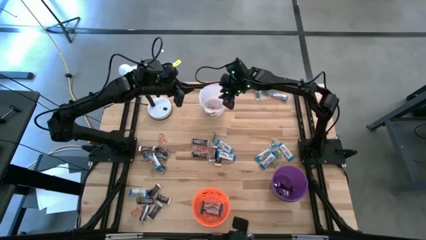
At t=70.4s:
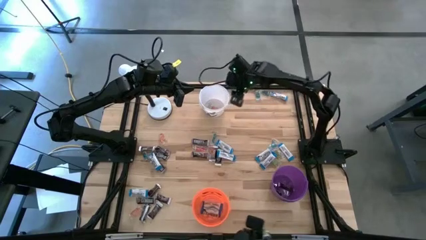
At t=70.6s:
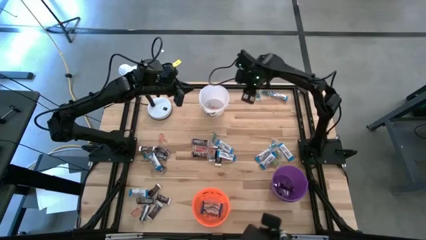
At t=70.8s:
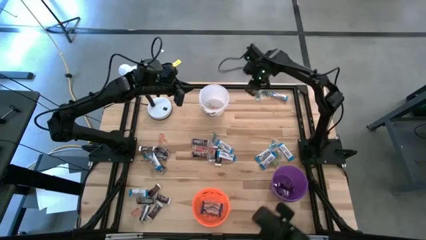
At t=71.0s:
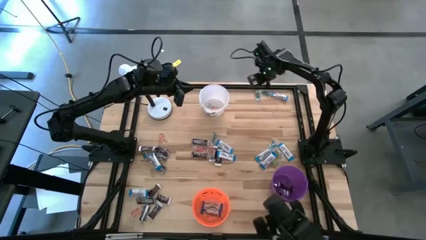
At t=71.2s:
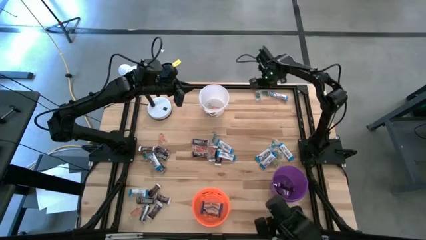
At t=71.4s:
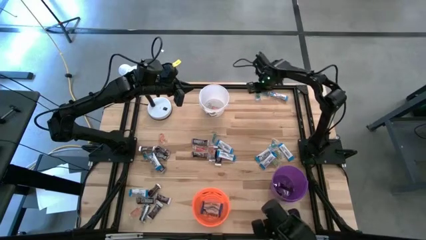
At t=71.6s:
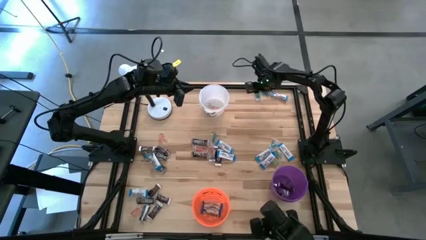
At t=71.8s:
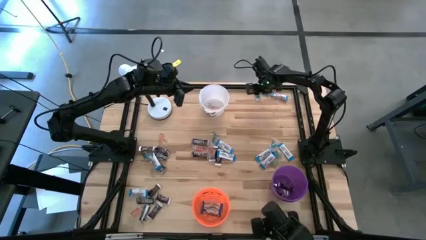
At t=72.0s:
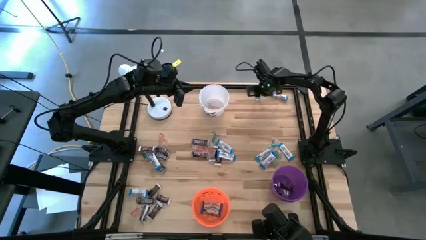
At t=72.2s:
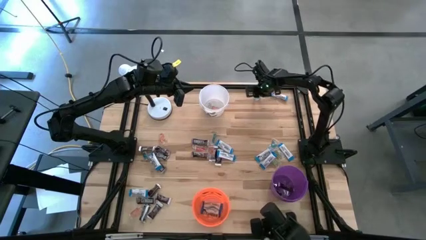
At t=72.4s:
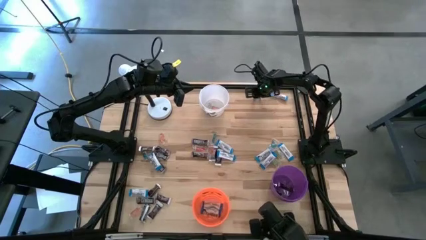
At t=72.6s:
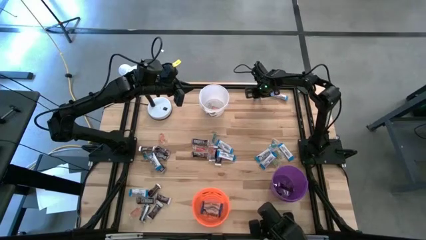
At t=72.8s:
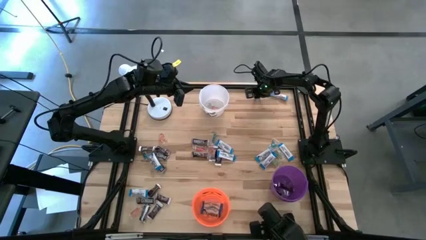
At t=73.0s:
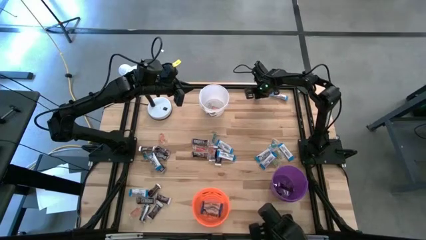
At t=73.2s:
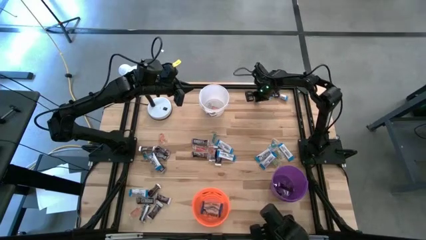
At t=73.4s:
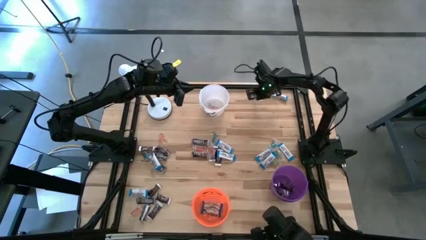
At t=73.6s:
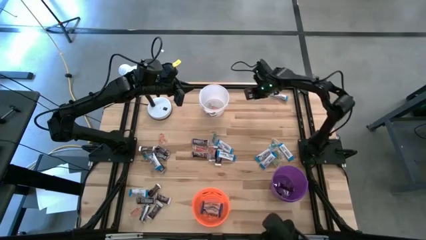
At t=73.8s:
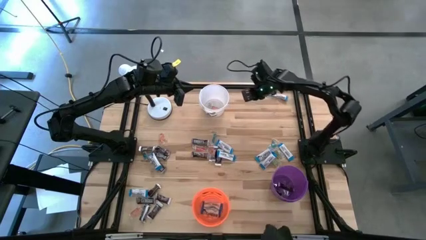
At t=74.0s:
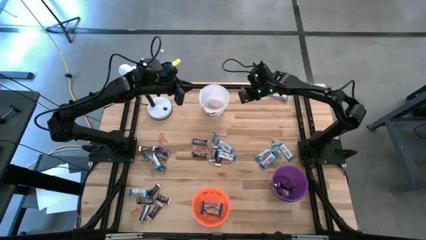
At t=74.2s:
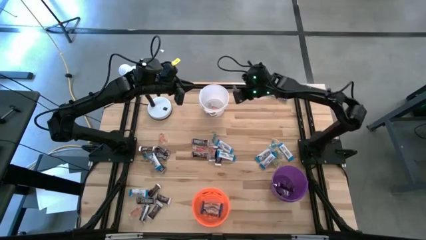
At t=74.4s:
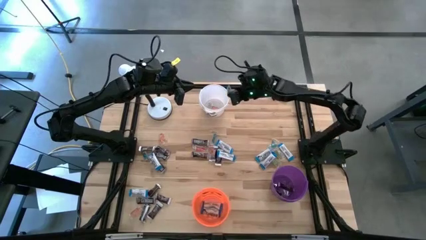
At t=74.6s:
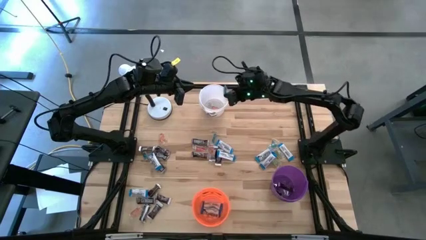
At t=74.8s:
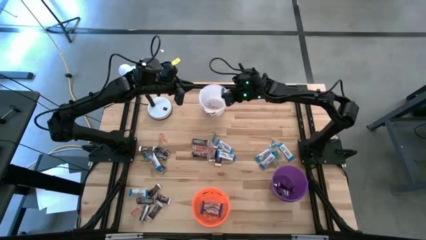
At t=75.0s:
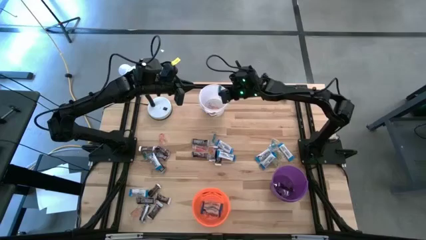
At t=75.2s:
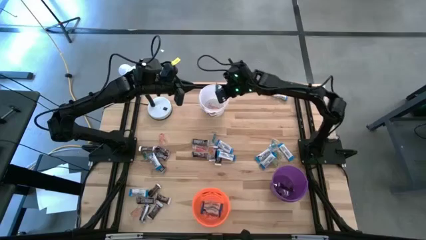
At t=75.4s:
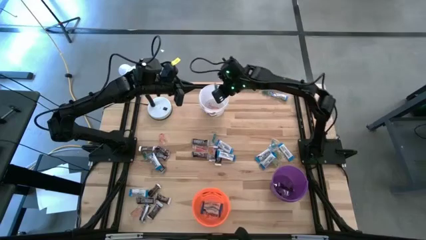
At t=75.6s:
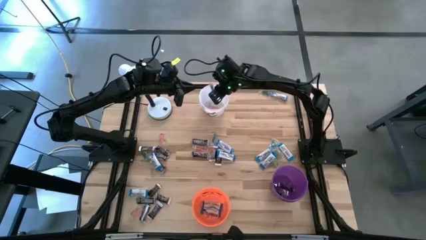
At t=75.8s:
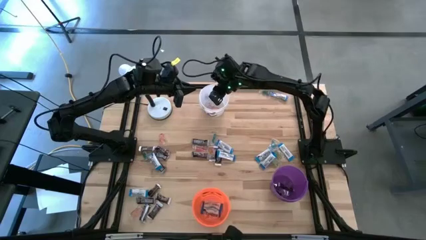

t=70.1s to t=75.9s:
Task: Organize candy in baskets
Put the blue gummy into the white bucket

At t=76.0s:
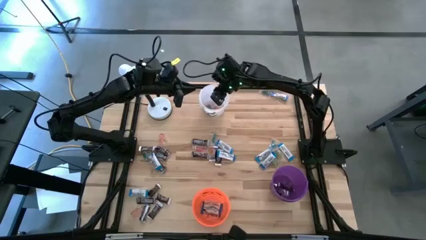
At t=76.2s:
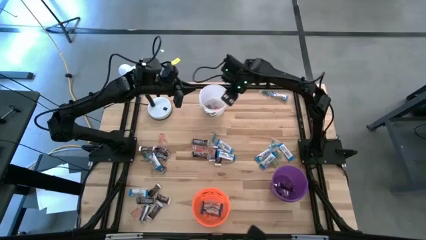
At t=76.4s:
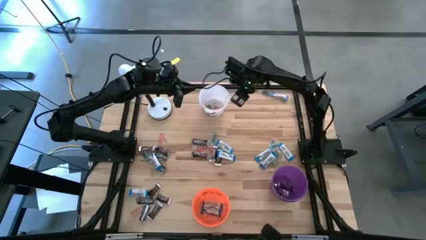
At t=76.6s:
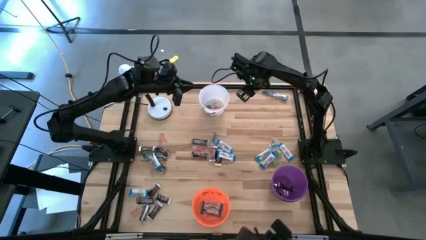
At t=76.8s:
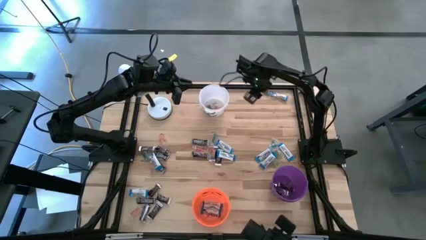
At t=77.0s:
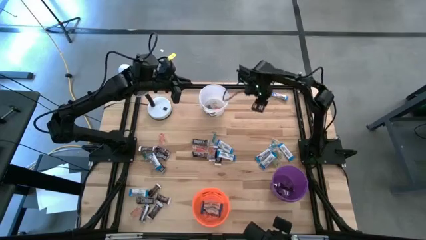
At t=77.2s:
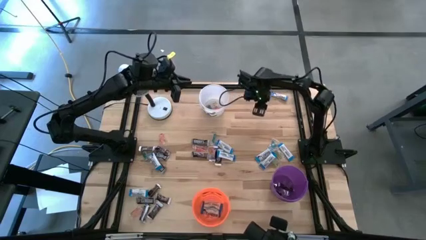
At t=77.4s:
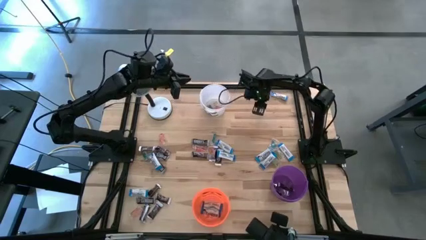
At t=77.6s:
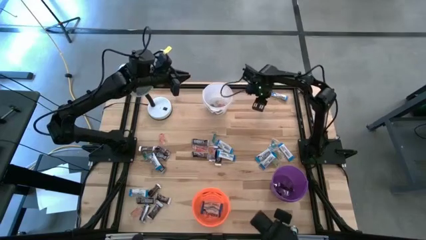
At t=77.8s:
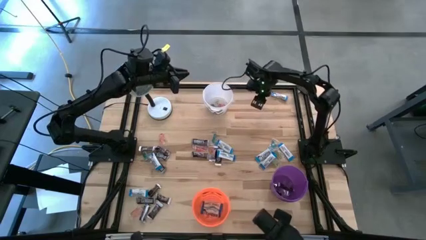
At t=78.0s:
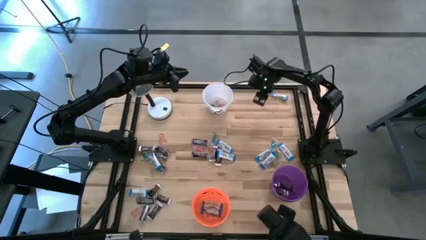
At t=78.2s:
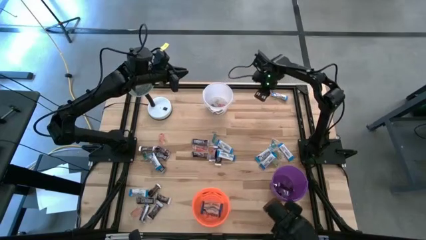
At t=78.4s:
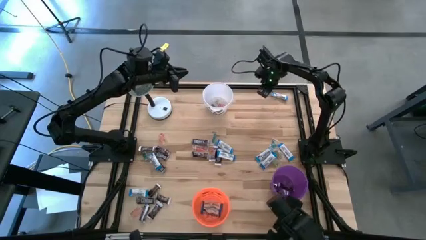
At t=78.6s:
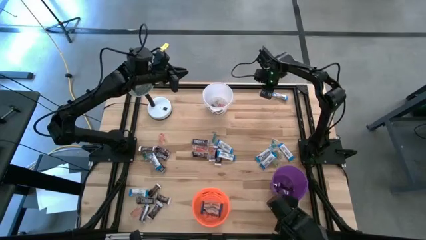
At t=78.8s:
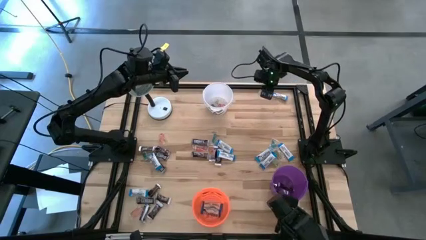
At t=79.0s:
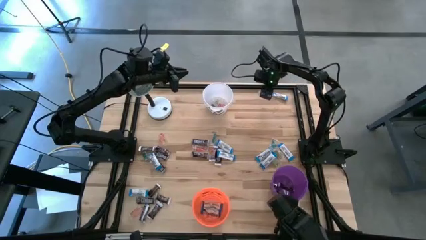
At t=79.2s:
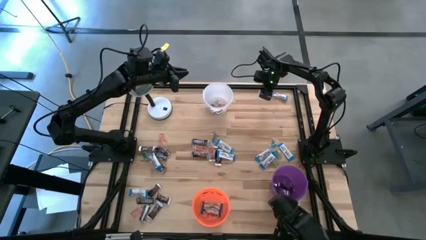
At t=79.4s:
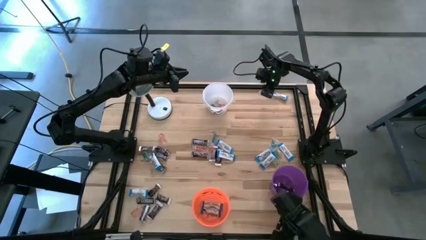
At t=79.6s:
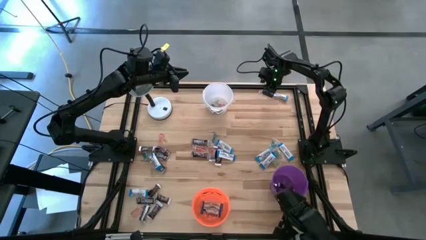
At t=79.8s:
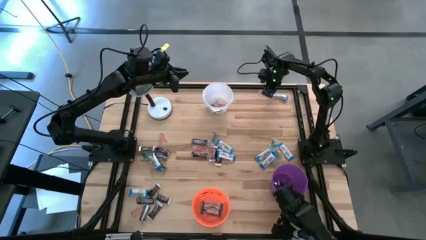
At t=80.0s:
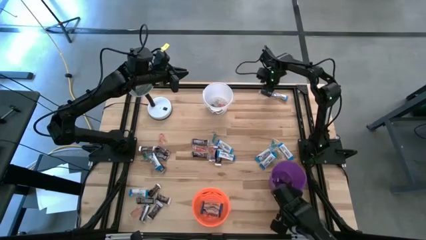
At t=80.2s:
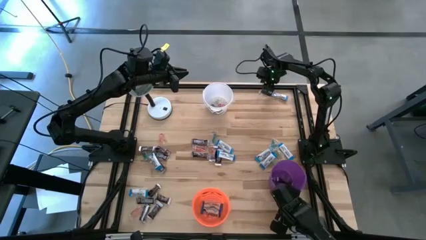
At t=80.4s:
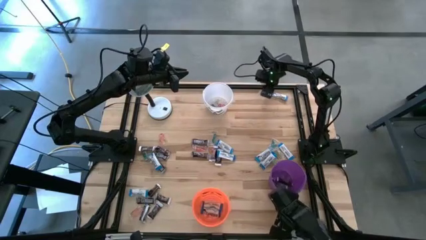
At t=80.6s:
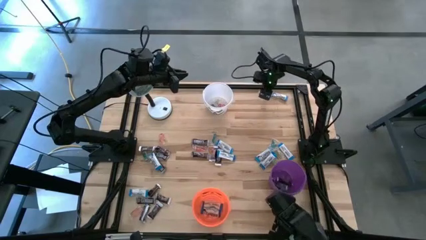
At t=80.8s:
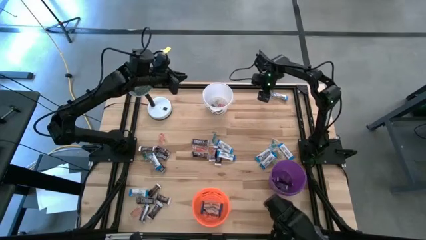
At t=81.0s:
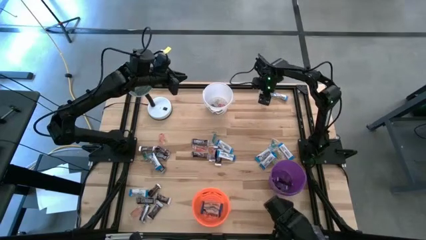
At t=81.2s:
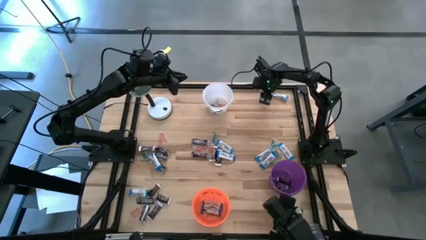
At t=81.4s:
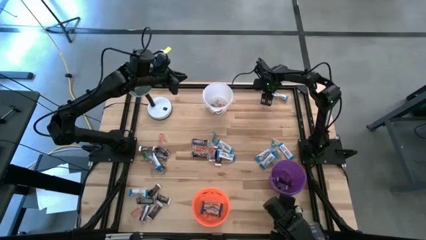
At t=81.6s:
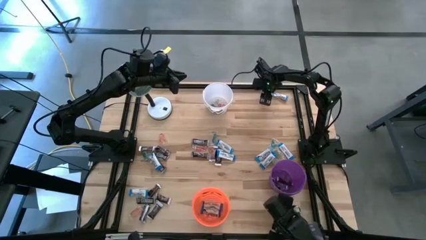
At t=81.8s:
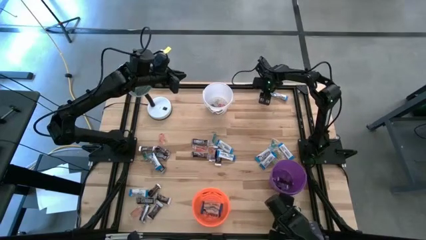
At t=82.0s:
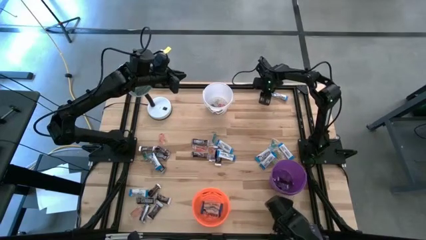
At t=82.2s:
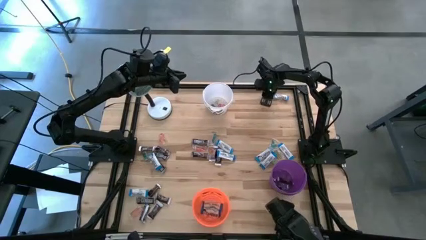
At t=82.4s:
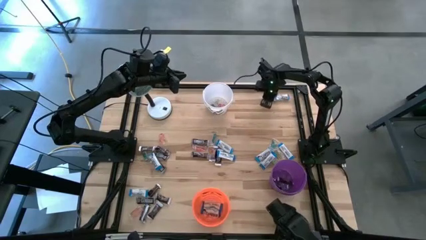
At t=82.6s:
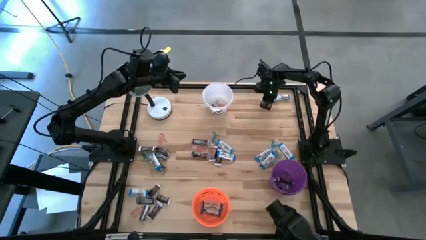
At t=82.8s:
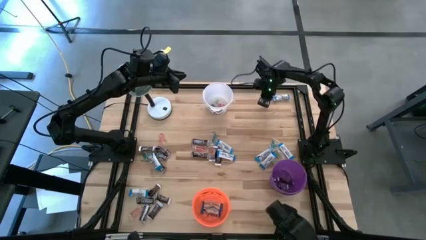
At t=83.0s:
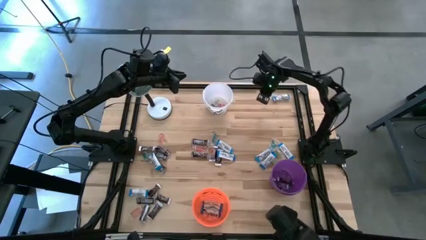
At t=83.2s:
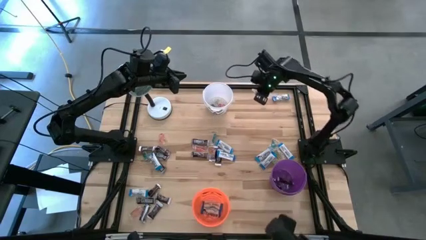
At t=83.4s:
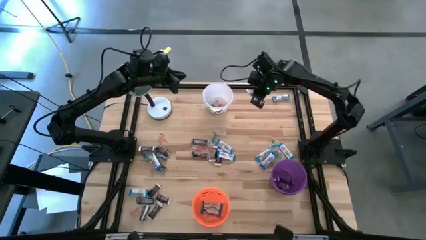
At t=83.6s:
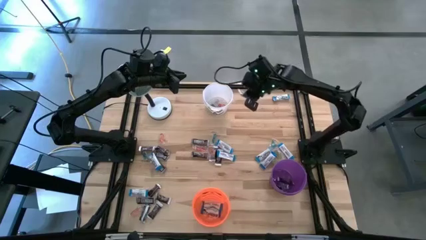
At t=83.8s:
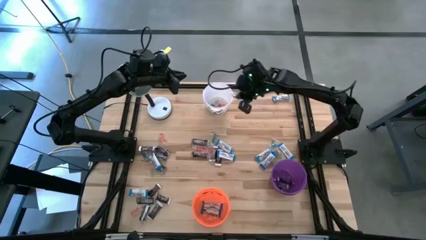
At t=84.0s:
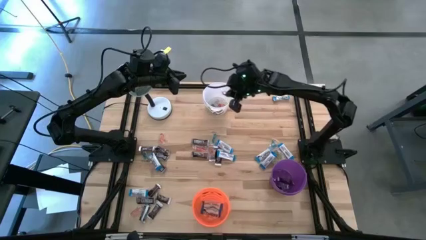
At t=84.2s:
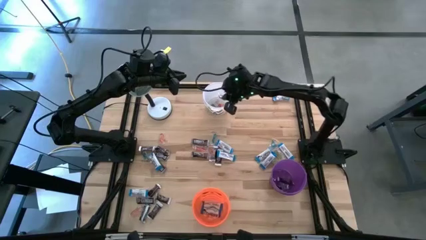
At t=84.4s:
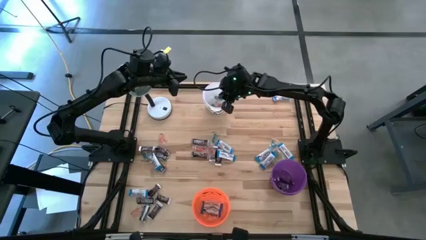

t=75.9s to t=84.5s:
Put the blue gummy into the white bucket
